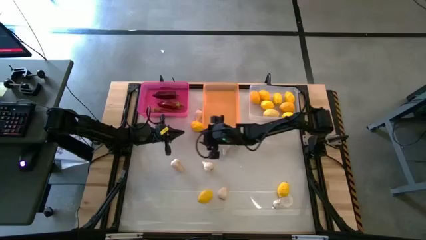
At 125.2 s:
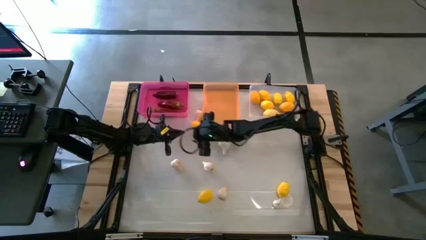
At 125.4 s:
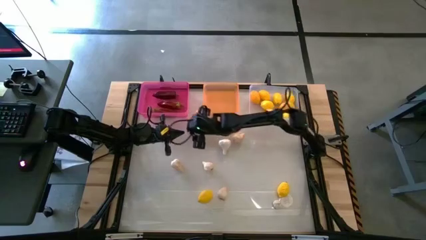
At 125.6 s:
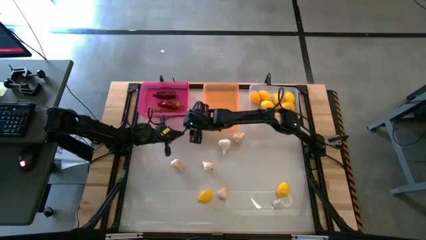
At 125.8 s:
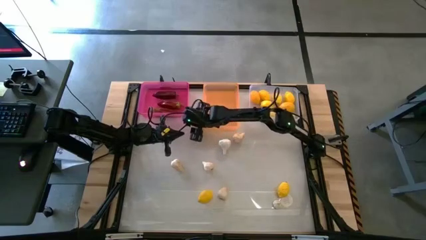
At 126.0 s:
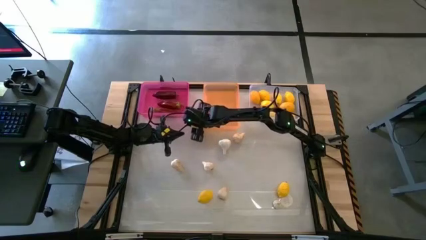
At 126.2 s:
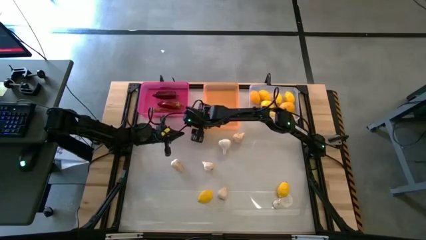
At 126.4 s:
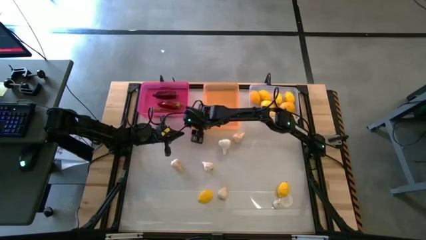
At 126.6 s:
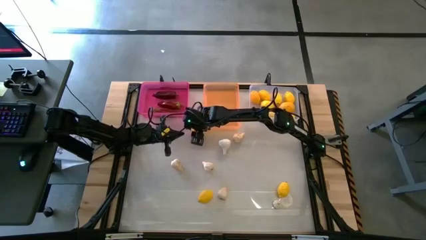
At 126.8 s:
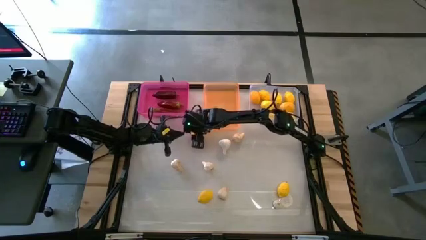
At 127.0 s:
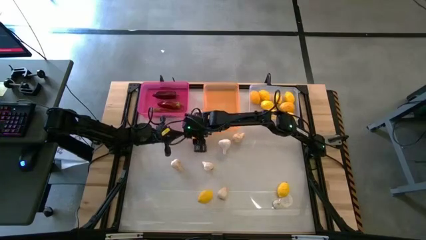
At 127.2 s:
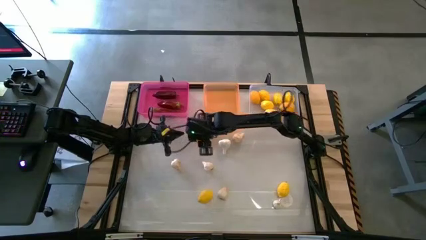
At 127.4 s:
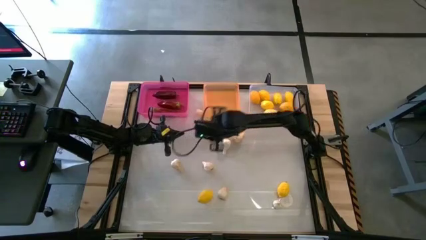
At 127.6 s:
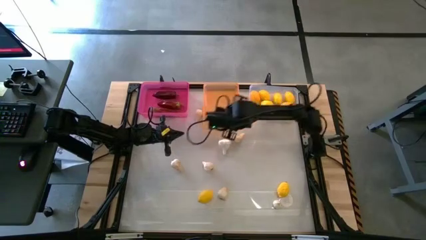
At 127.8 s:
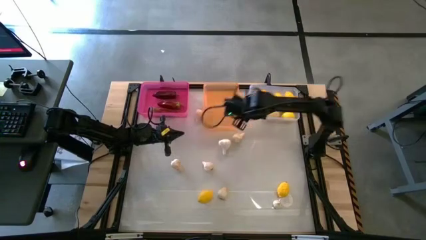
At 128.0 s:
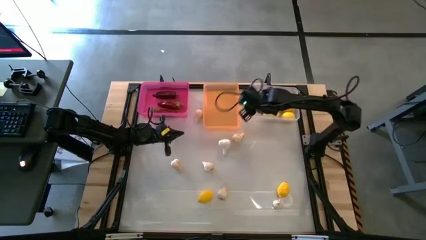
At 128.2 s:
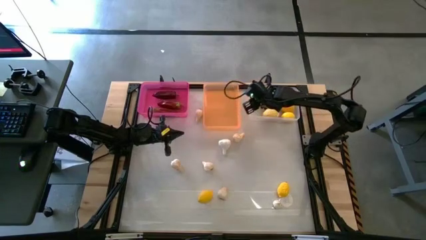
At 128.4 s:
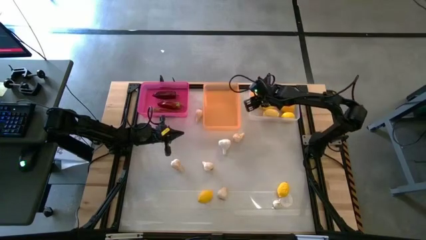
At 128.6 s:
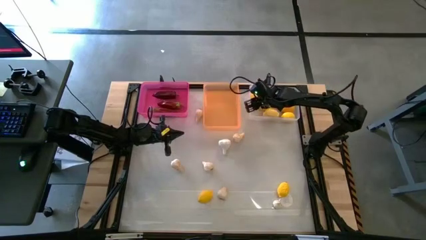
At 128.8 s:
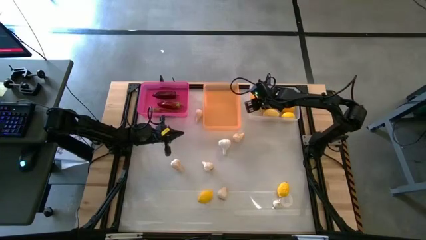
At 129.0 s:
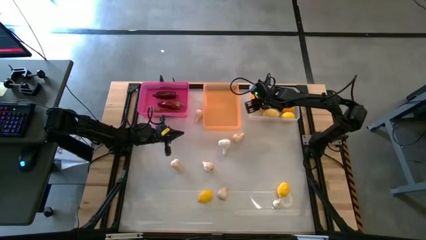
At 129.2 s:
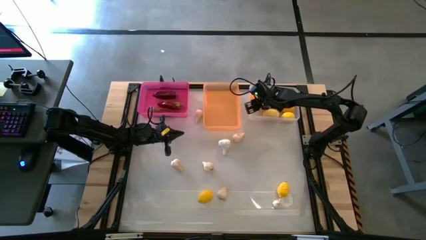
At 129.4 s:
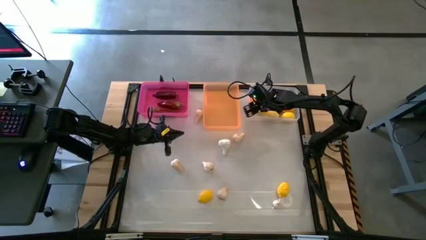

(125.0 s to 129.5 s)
Task: Sort produce into baskets
Put the yellow lemon into the transparent bin

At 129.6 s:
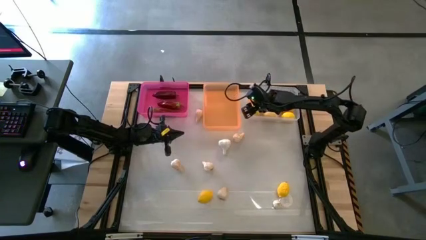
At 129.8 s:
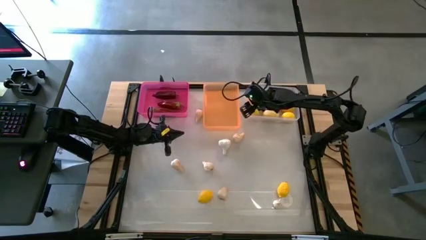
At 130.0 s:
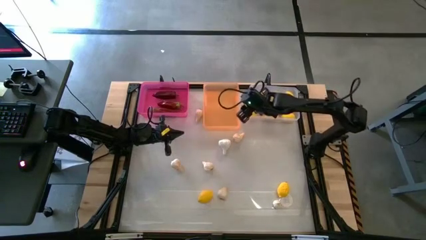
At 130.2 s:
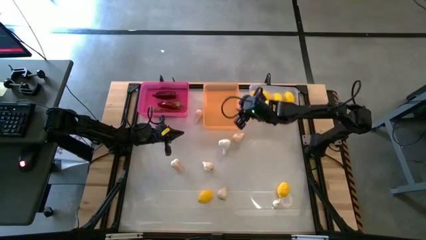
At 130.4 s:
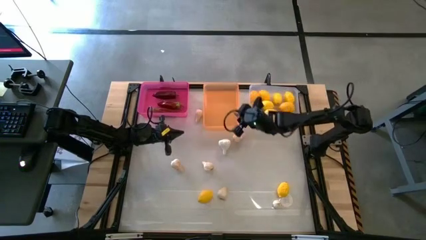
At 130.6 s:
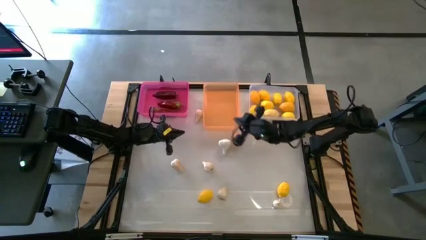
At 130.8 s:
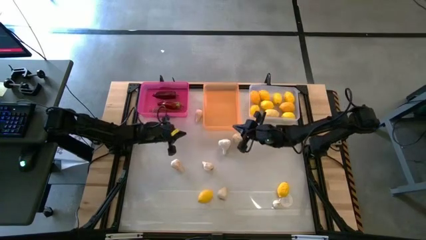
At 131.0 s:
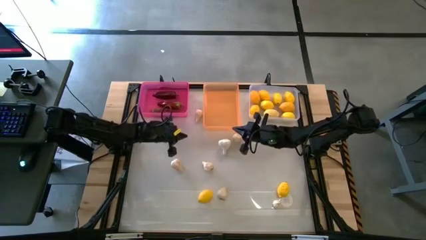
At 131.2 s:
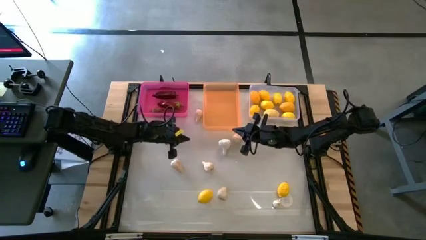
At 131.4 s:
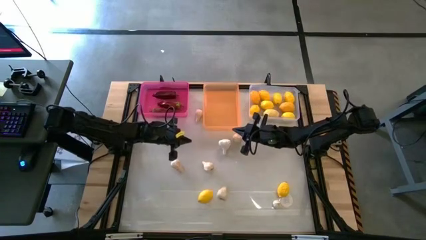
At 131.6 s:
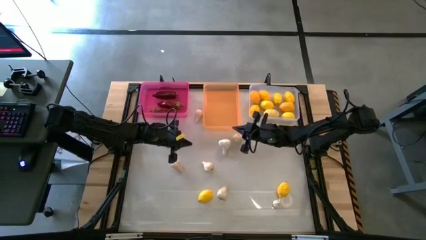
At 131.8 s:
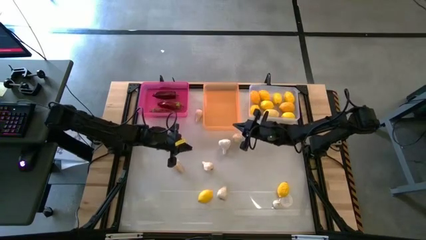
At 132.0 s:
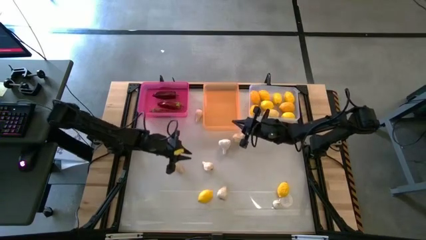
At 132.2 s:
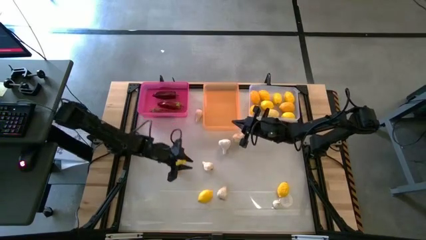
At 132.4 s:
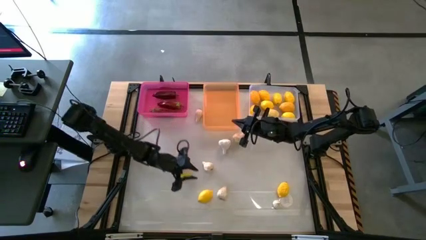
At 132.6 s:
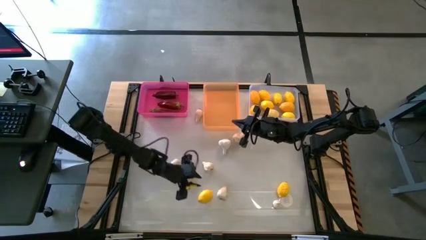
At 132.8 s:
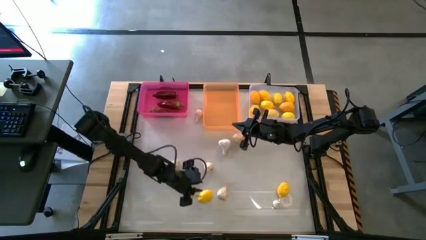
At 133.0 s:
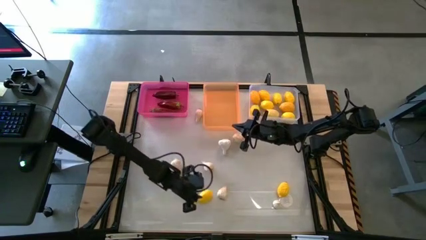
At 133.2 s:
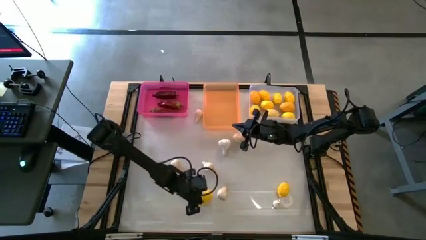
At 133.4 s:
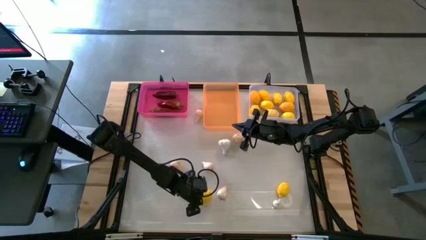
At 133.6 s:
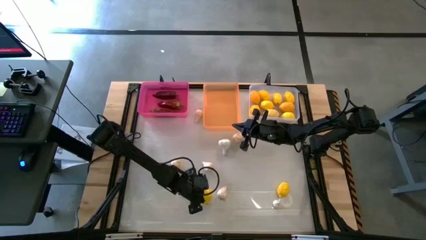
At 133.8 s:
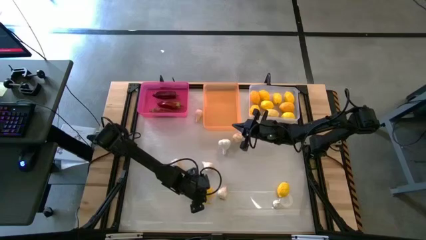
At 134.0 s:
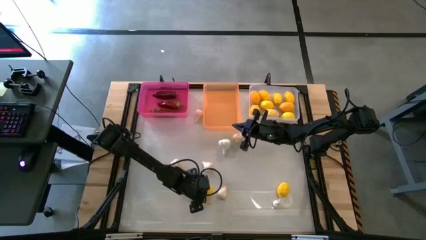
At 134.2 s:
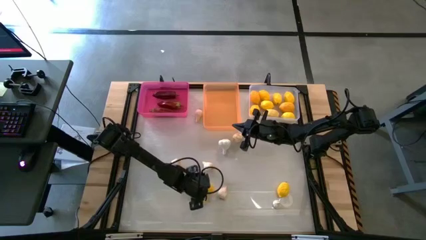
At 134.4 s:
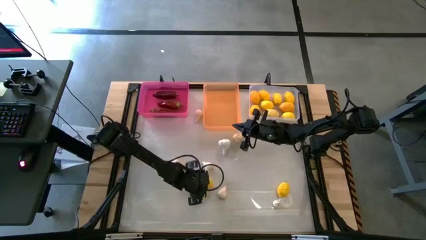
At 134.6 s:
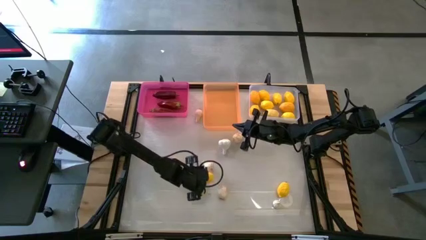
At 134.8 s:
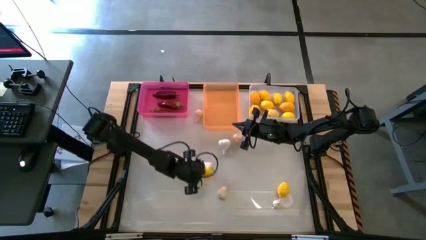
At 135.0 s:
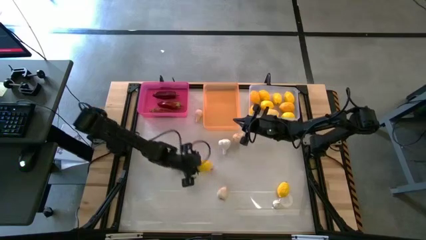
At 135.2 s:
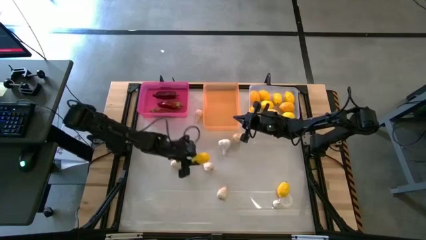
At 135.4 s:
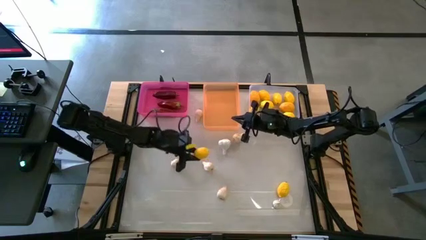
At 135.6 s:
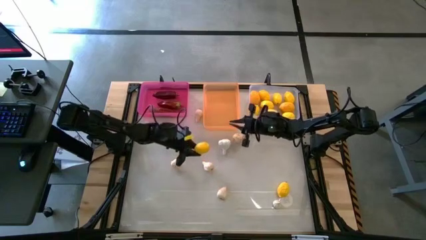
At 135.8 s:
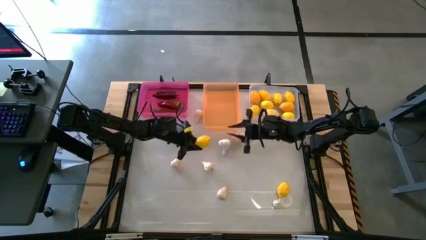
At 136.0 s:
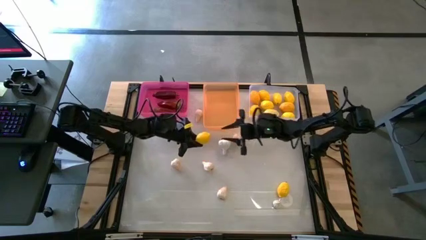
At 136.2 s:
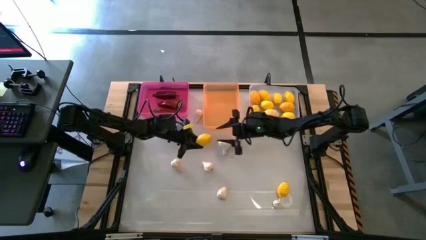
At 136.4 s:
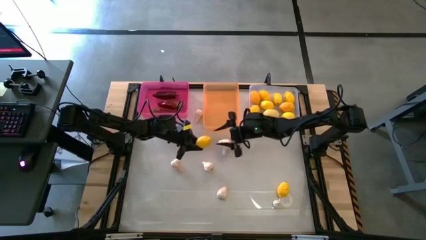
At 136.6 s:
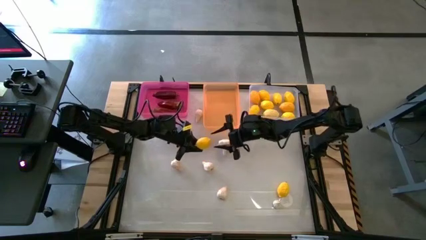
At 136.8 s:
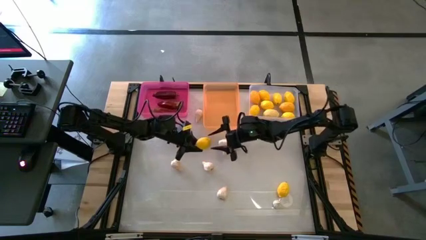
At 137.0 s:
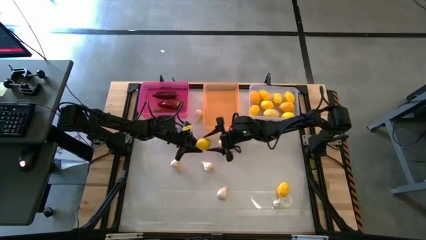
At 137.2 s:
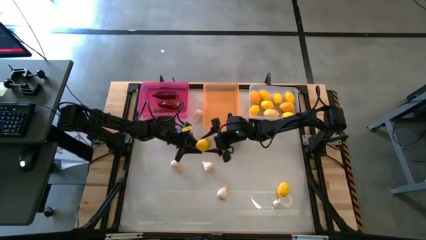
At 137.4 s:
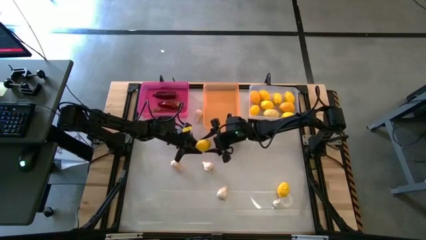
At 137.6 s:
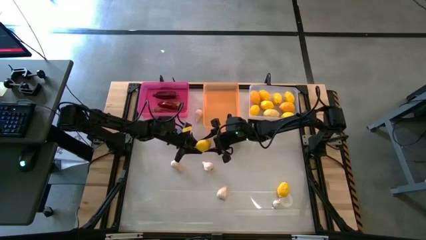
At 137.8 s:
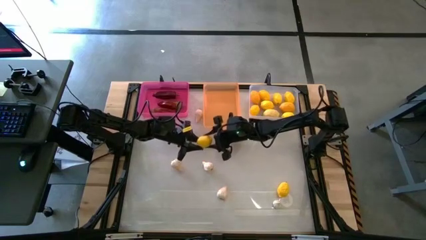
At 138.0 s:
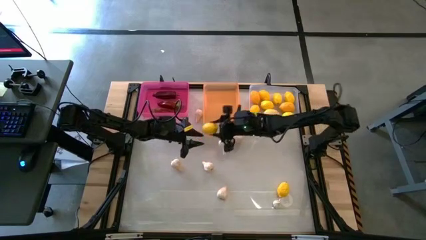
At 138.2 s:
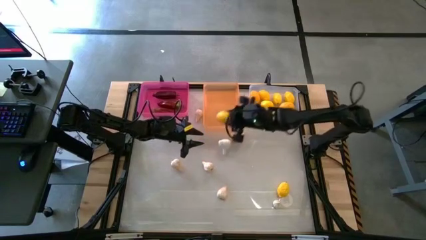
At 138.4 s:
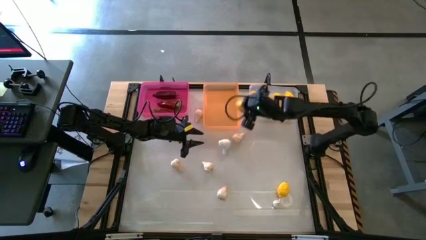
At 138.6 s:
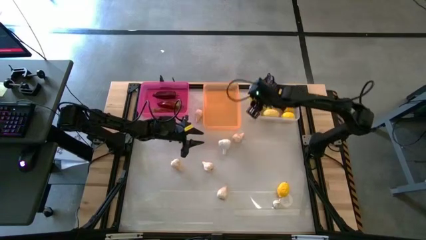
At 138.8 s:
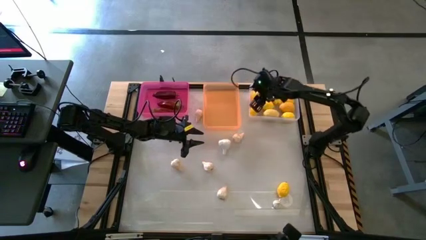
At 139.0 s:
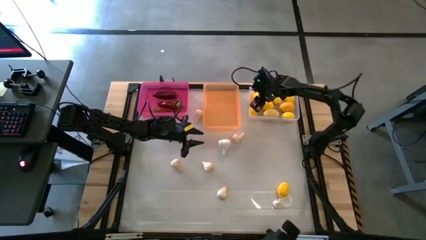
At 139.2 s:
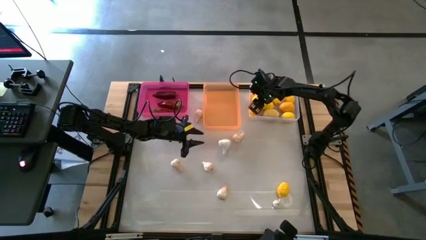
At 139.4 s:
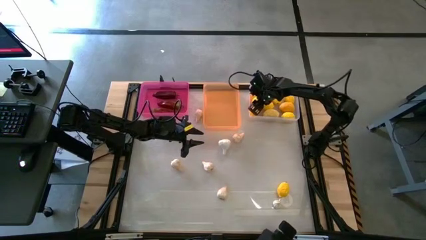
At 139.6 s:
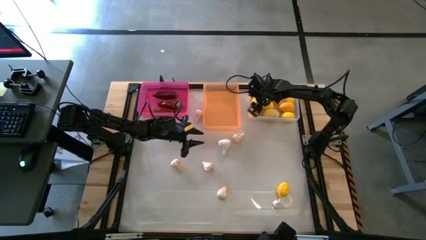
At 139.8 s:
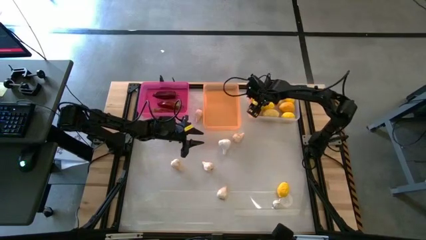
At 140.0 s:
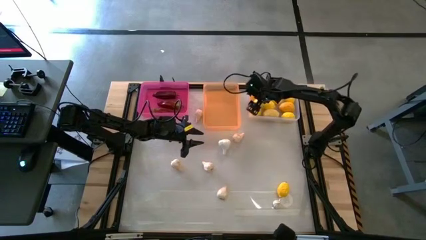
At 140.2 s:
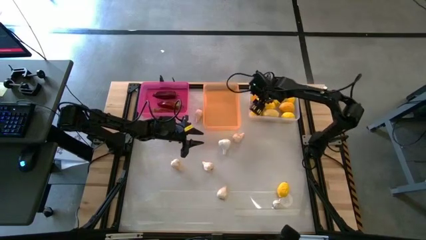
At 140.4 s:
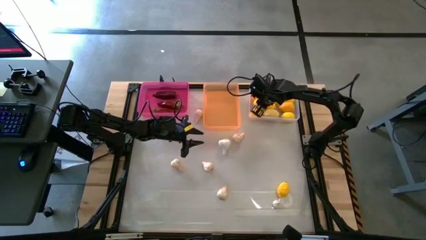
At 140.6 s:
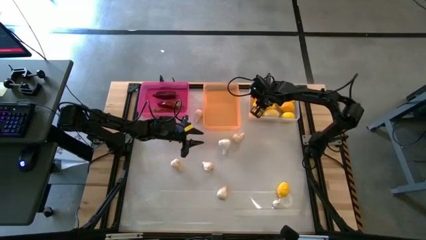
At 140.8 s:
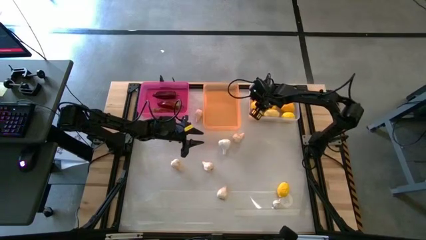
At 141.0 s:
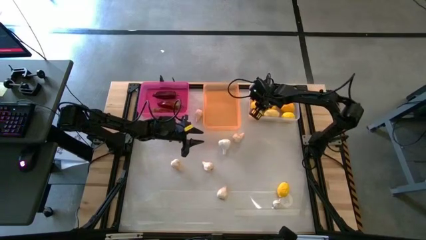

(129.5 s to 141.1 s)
Put the yellow lemon into the transparent bin
